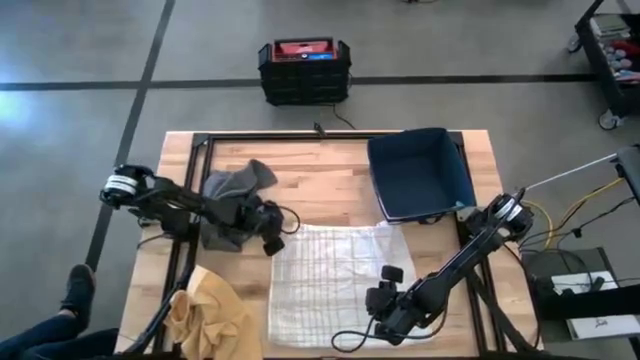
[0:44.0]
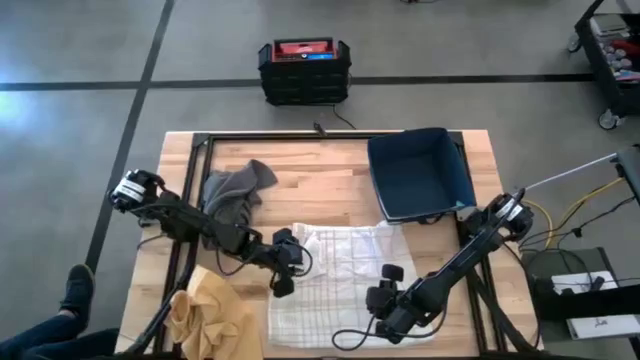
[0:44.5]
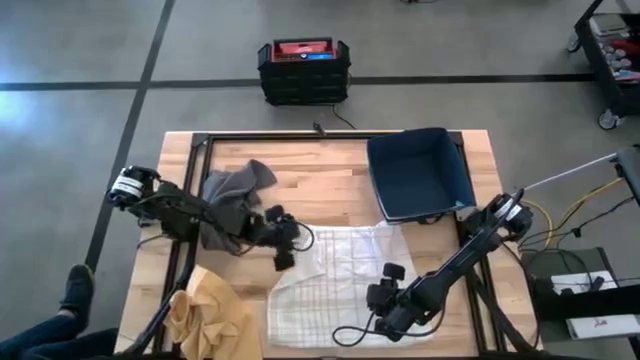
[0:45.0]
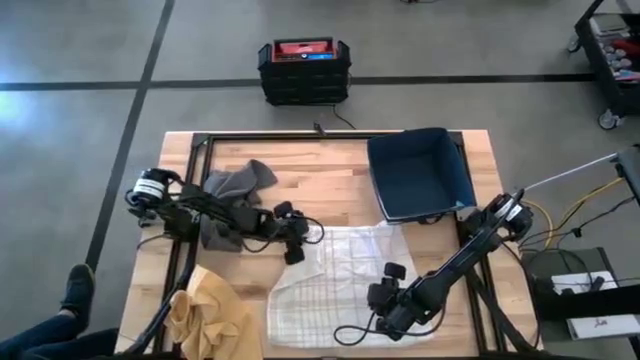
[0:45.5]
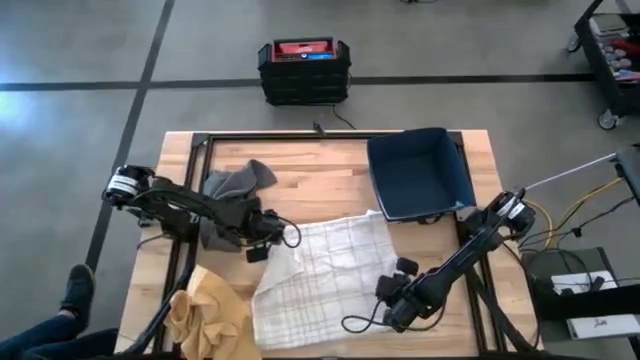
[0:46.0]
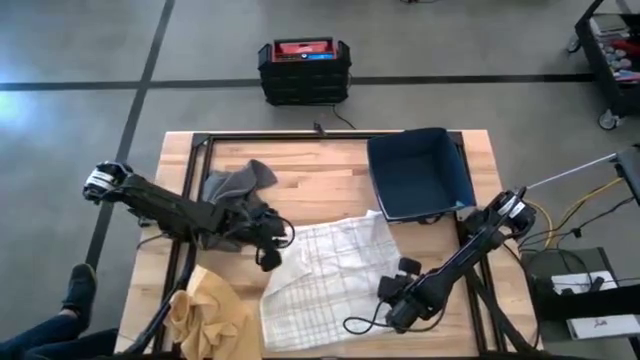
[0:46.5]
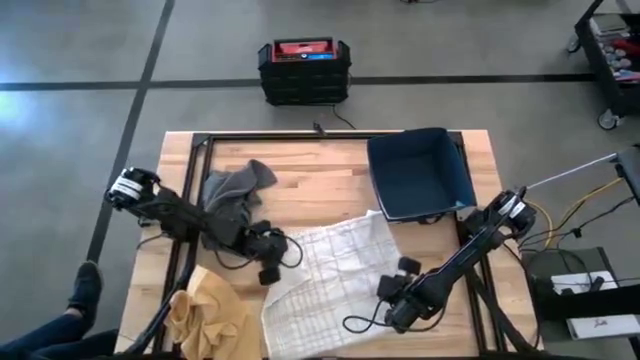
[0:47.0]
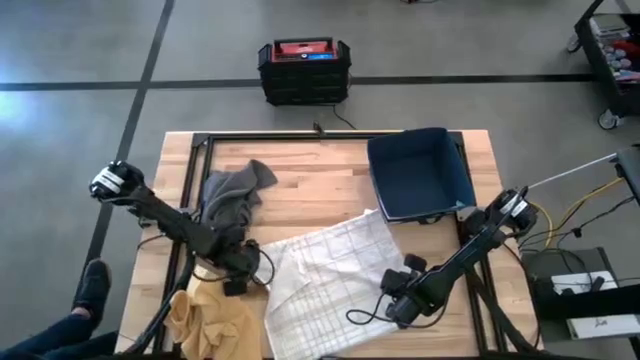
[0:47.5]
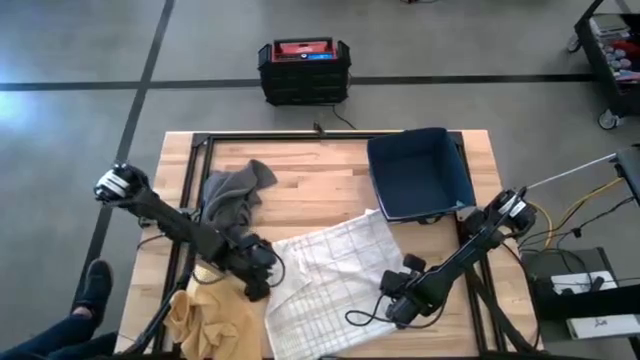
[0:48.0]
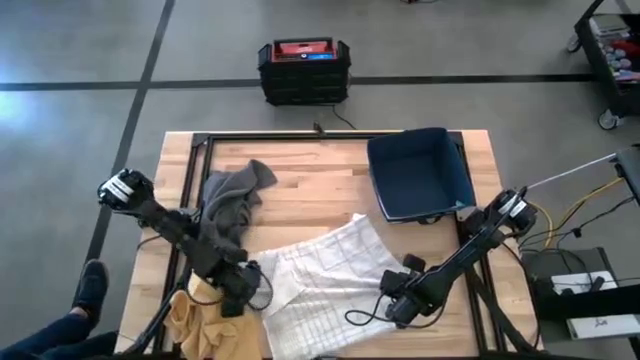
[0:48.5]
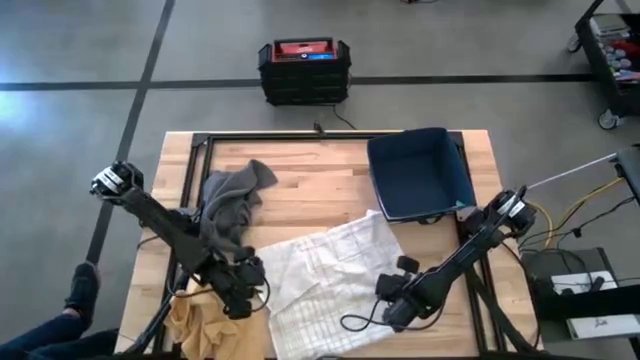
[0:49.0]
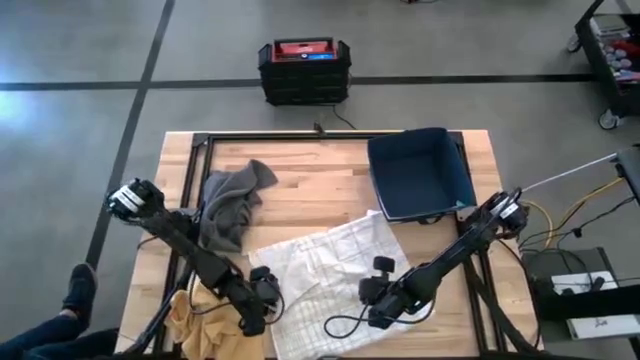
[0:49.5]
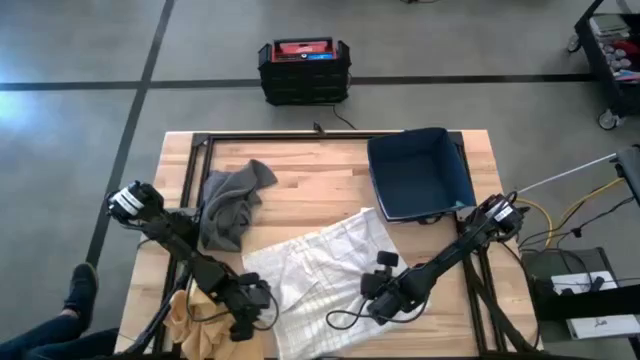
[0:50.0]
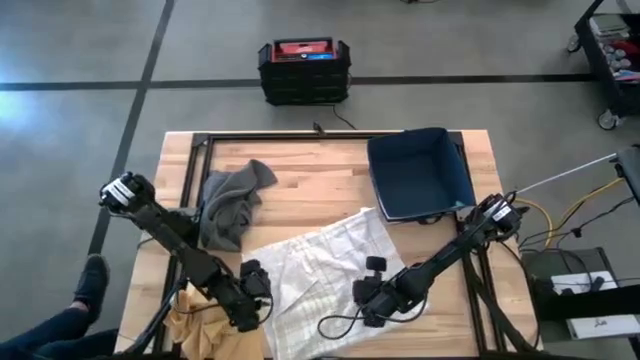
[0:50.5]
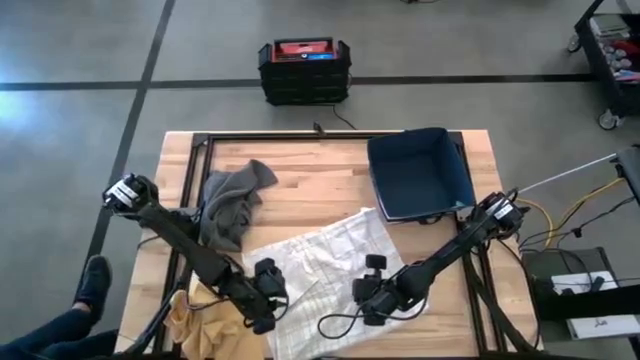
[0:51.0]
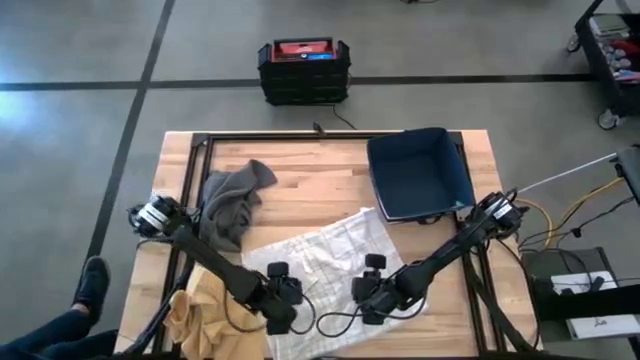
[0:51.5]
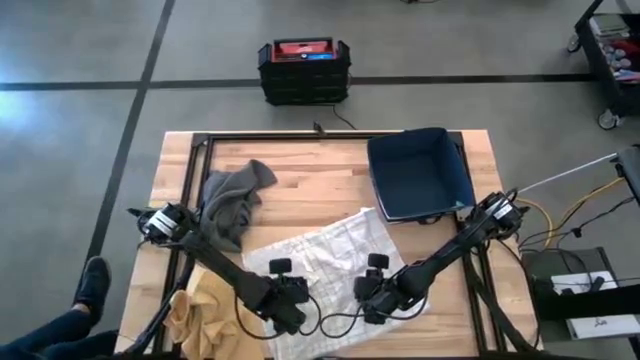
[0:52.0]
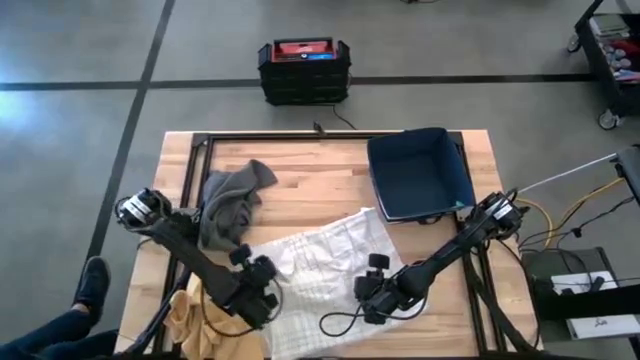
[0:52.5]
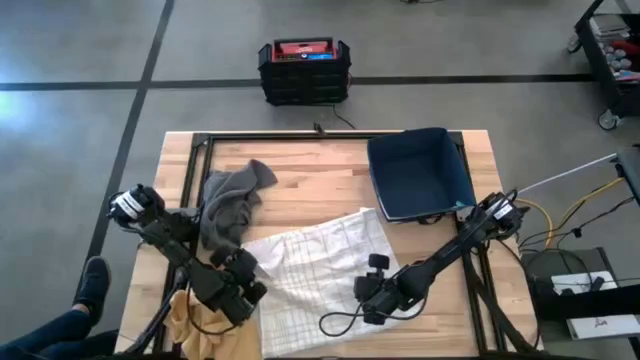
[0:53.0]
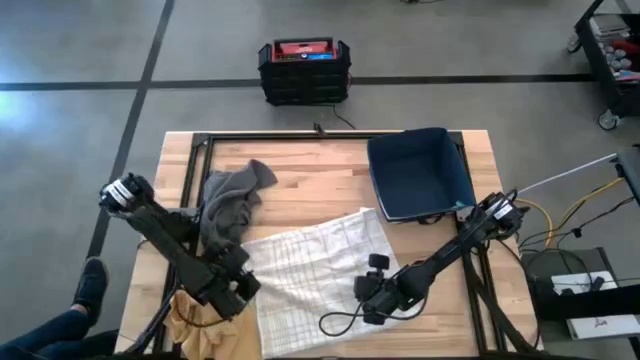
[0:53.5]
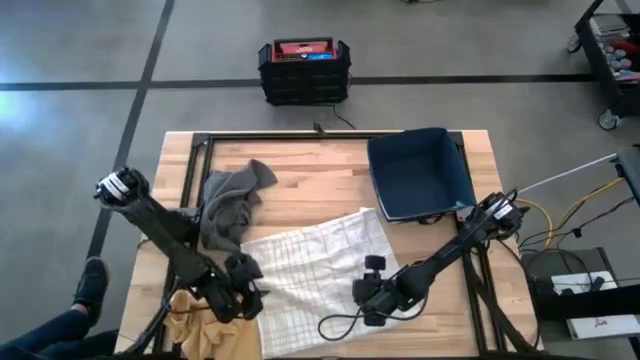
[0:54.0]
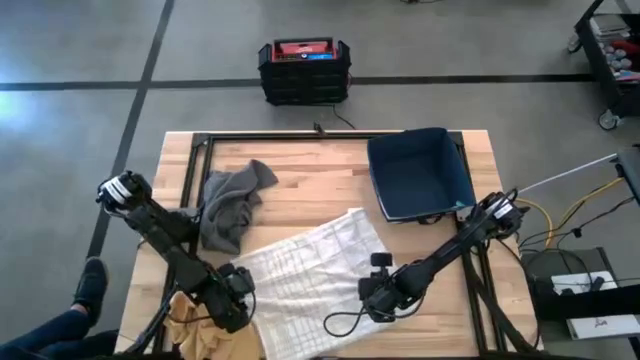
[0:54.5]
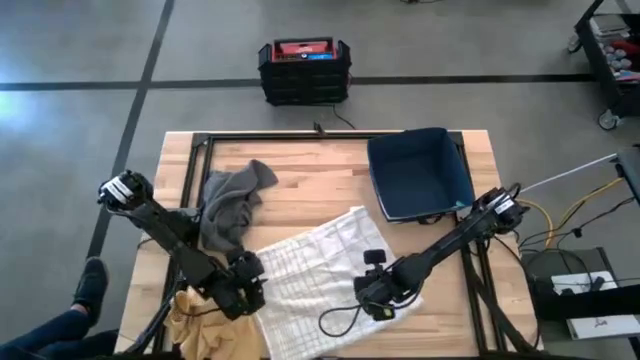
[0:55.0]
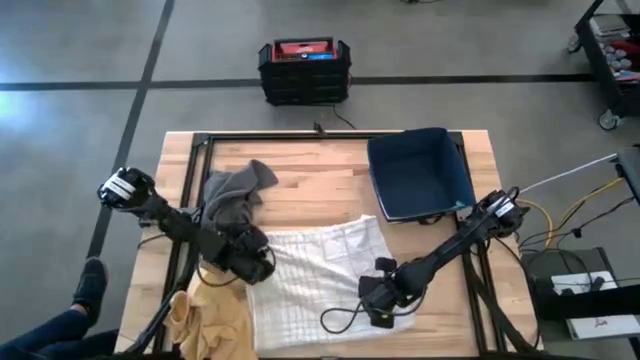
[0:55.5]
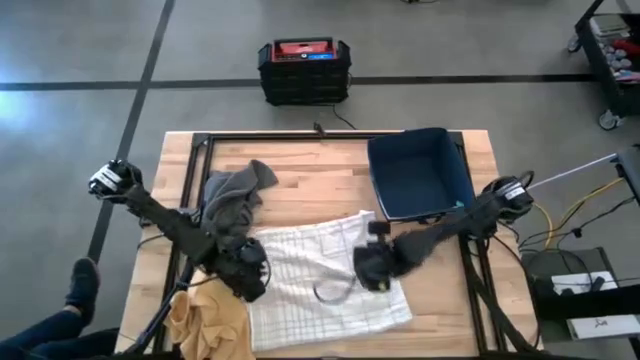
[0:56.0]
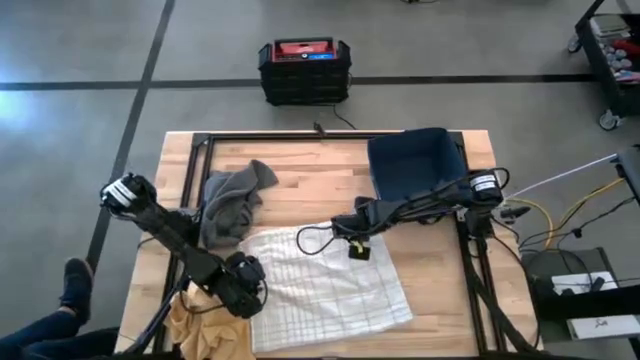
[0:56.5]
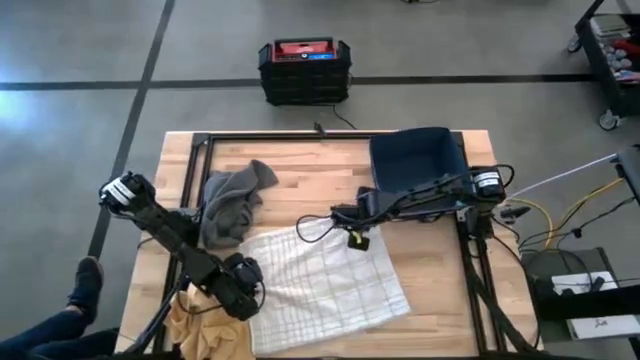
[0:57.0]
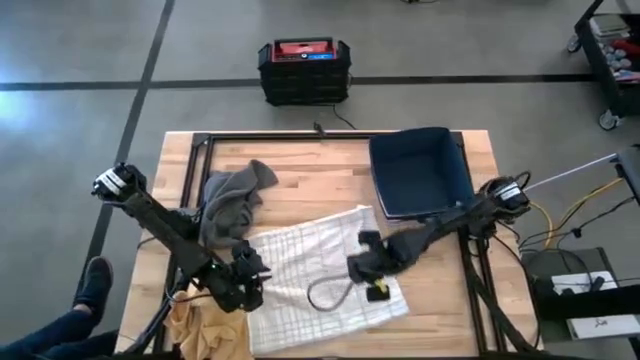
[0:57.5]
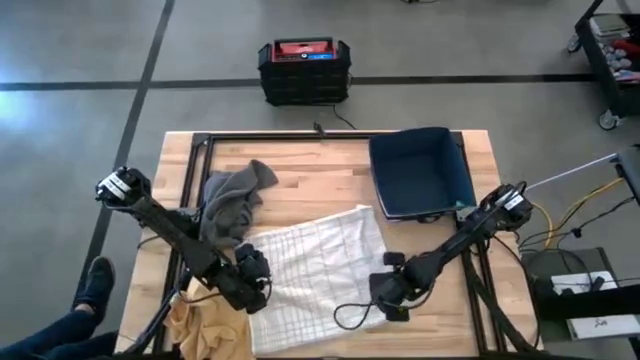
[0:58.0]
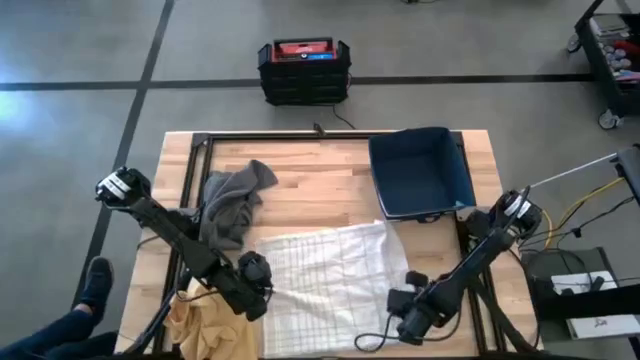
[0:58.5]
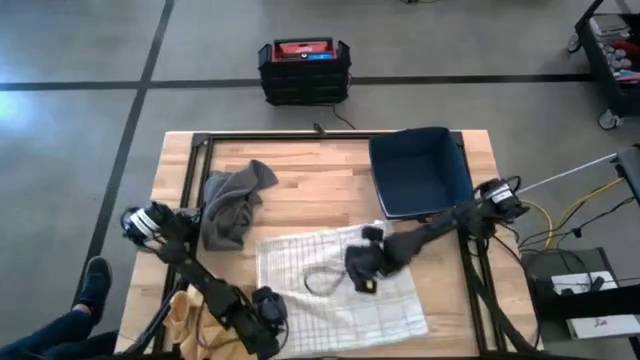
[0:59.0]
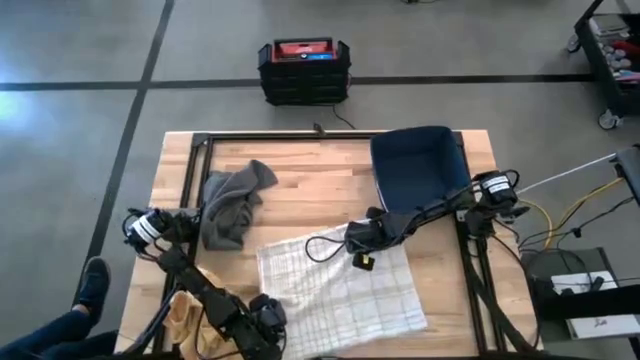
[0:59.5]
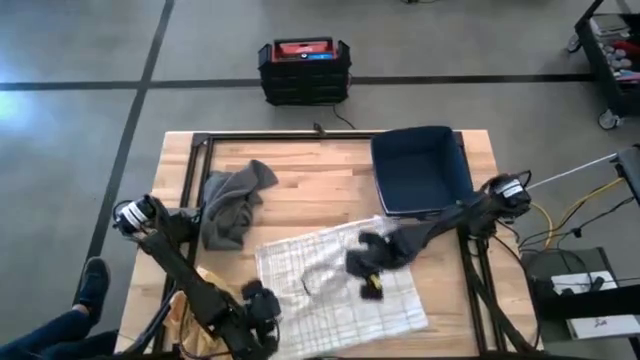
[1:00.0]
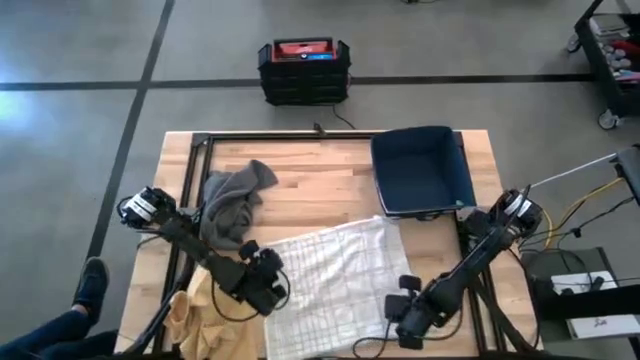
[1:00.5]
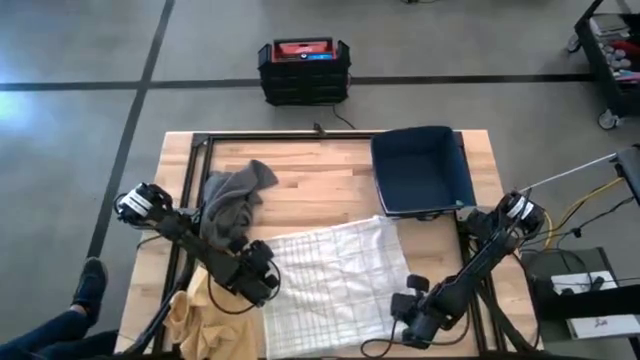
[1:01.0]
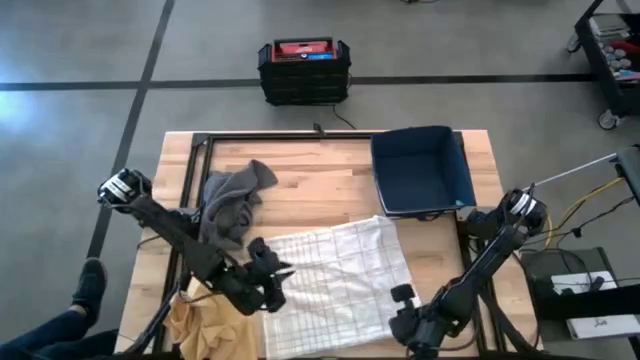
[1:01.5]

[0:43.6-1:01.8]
Task: Fold towel
Fold the white towel

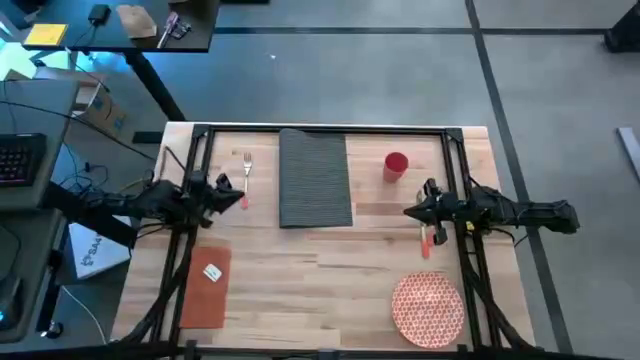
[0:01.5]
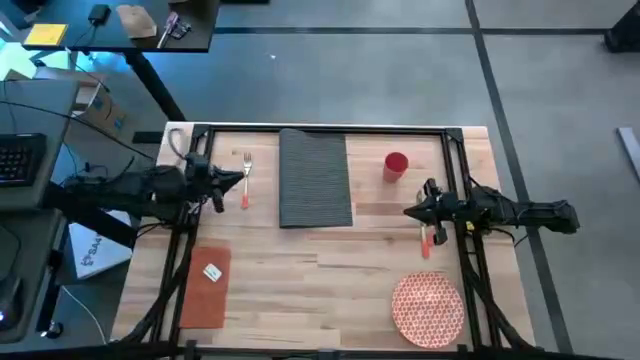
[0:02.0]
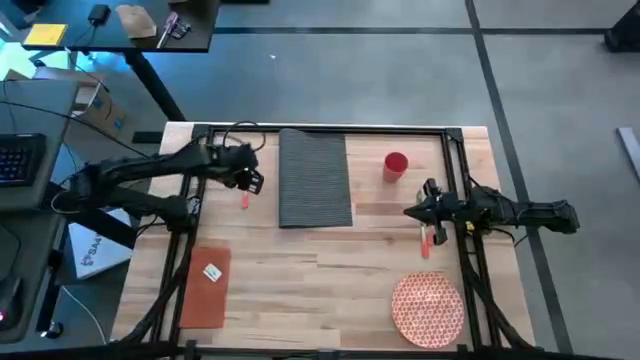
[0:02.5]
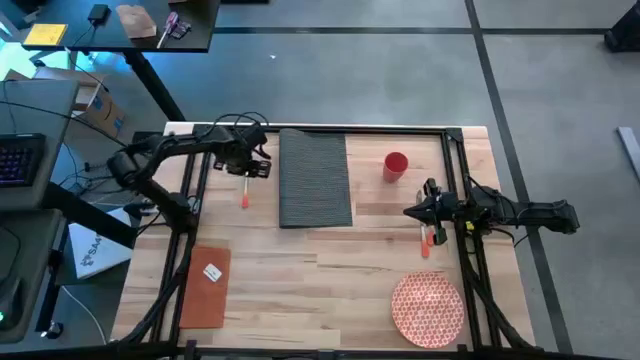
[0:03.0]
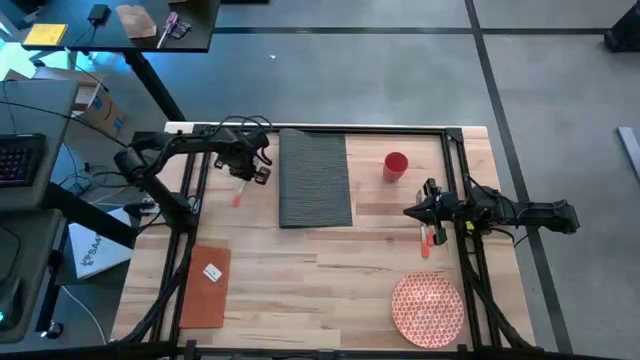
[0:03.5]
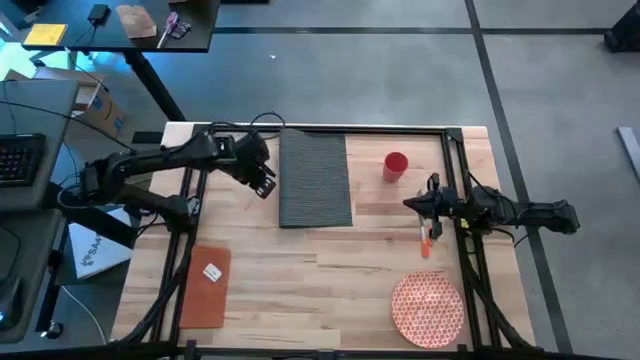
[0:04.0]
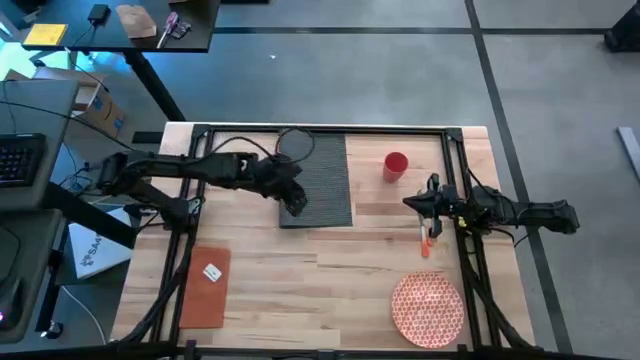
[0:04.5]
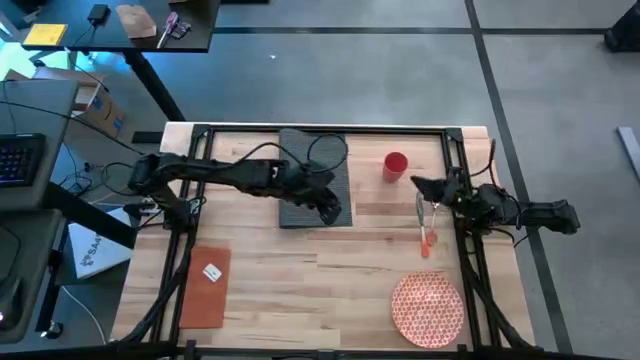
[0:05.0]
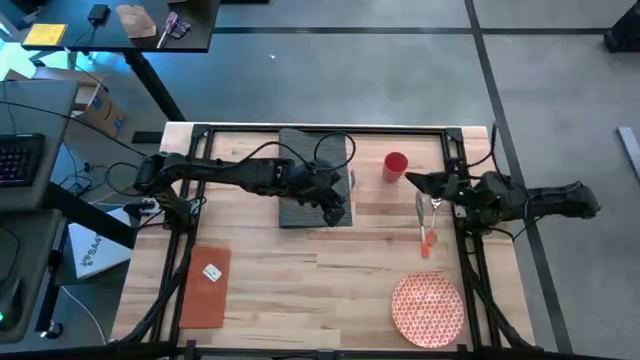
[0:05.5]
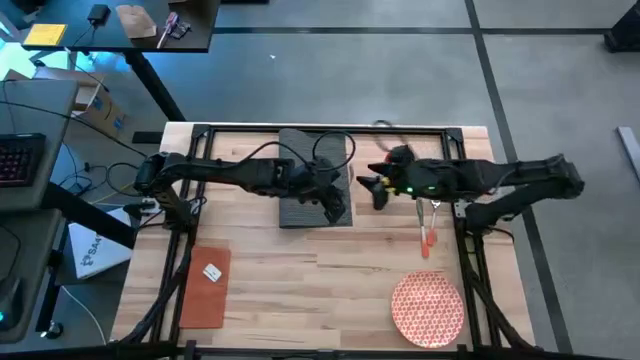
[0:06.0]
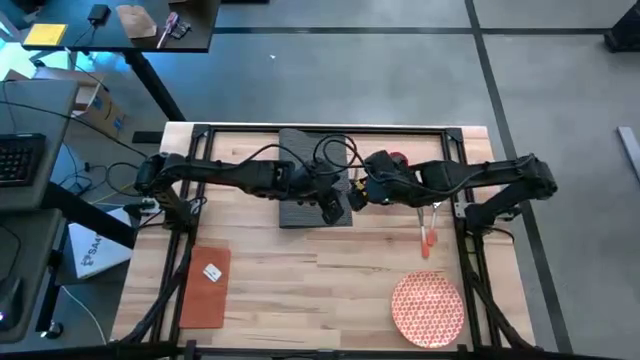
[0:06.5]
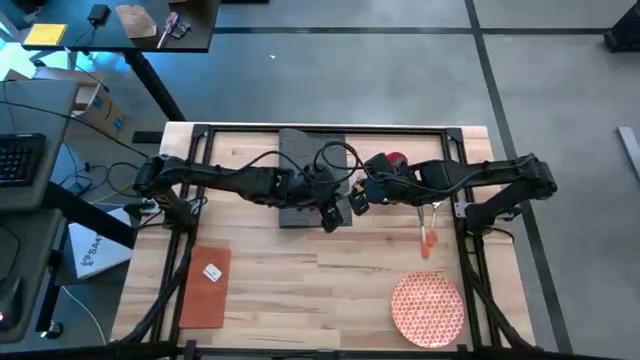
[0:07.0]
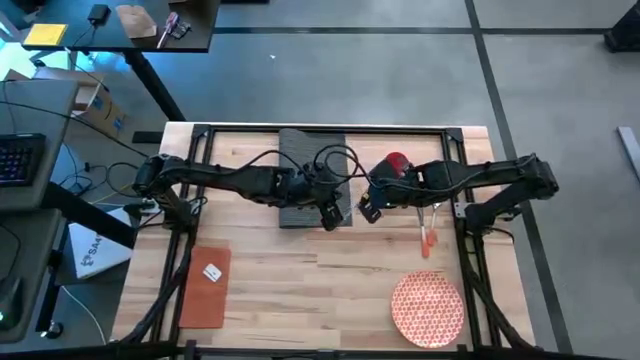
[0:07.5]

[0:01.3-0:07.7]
Task: Set table place
Move the orange fork from the upper left to the middle right of the table
